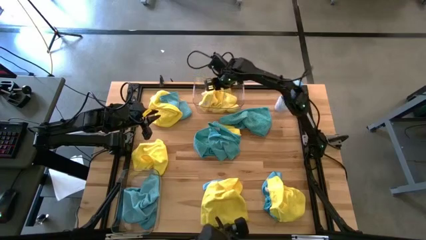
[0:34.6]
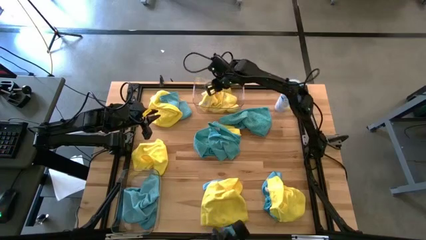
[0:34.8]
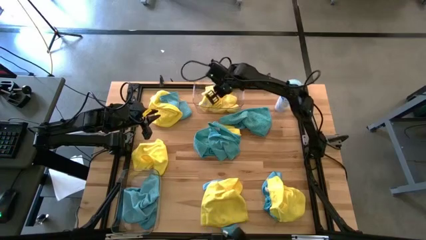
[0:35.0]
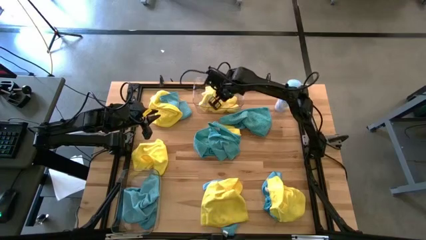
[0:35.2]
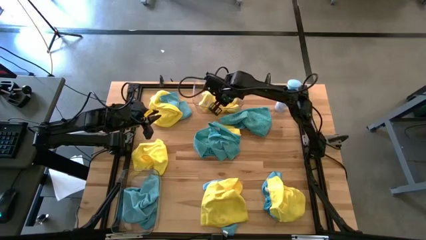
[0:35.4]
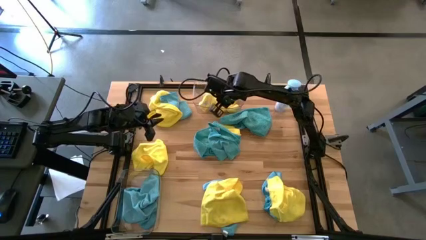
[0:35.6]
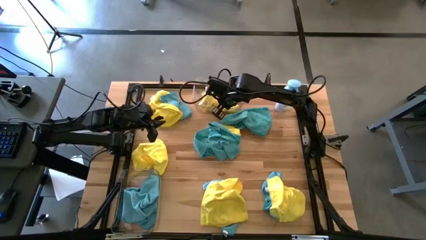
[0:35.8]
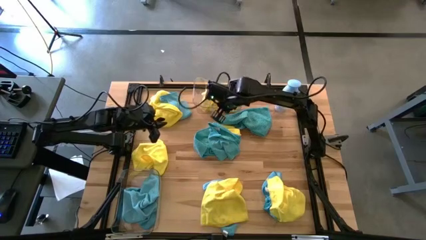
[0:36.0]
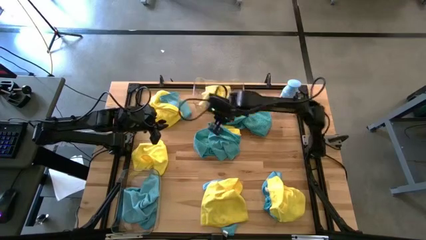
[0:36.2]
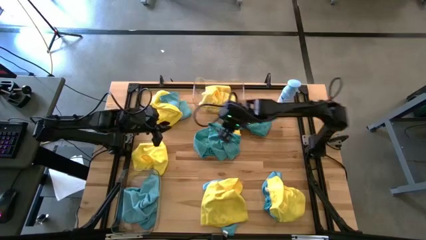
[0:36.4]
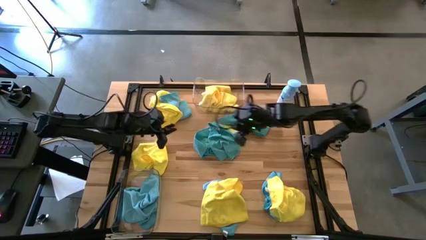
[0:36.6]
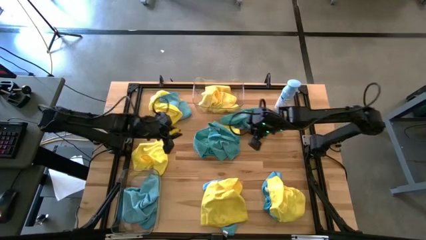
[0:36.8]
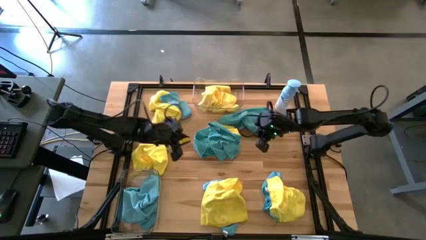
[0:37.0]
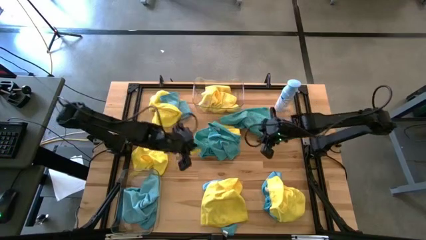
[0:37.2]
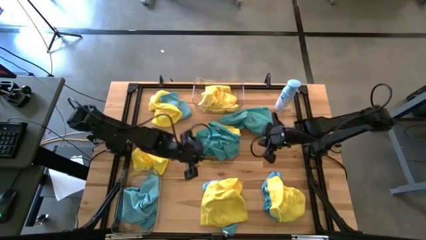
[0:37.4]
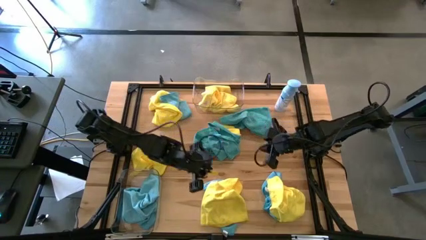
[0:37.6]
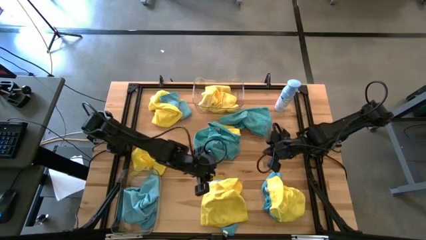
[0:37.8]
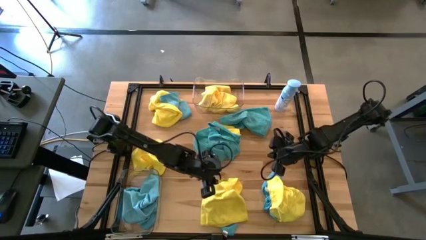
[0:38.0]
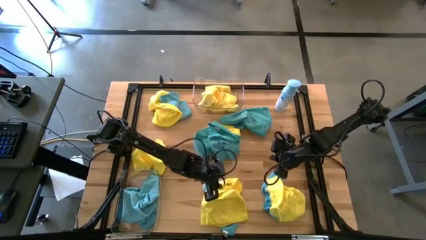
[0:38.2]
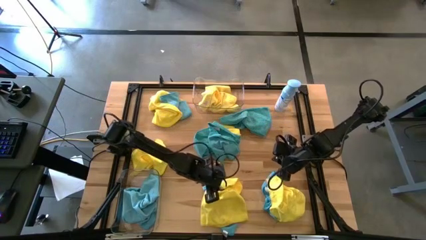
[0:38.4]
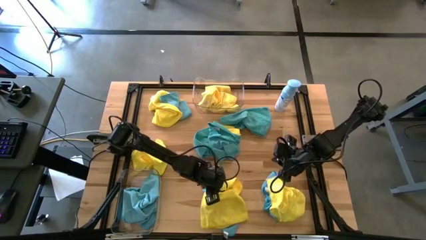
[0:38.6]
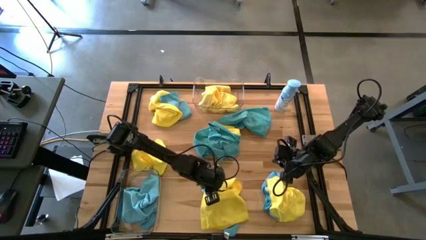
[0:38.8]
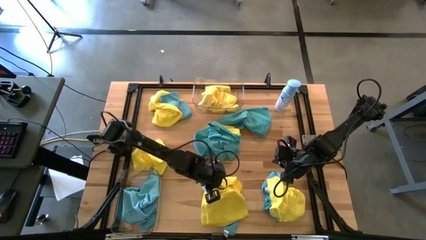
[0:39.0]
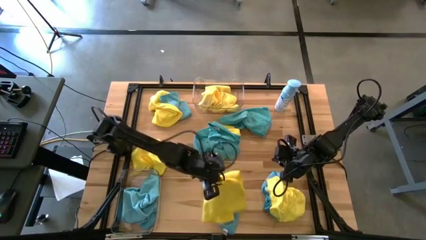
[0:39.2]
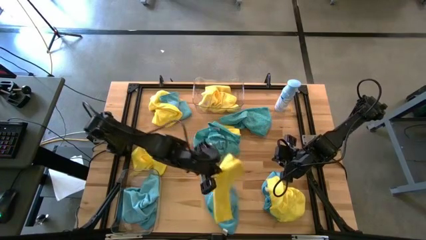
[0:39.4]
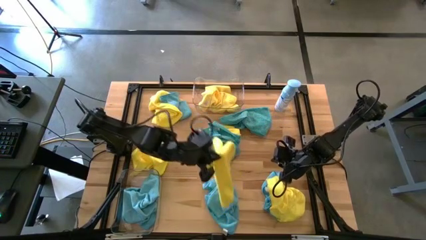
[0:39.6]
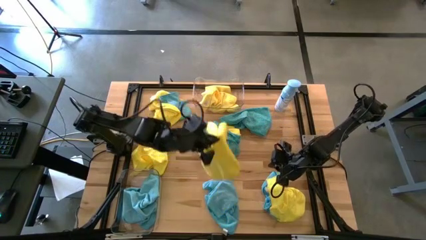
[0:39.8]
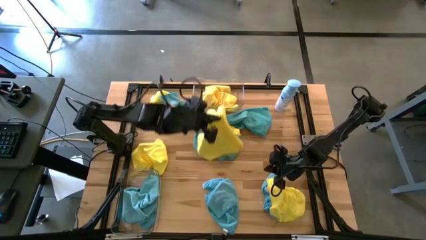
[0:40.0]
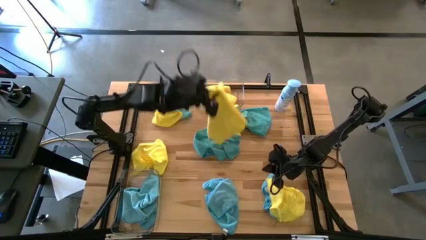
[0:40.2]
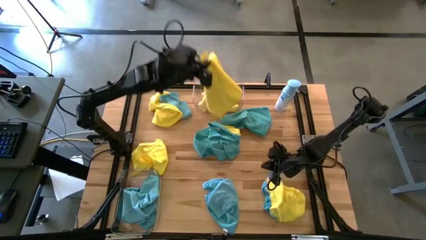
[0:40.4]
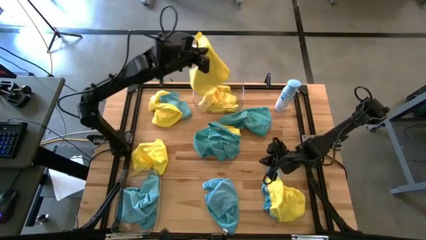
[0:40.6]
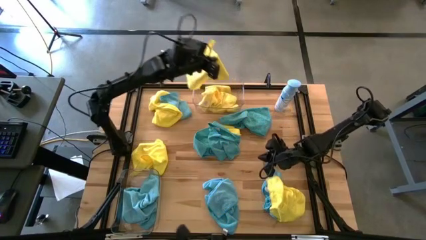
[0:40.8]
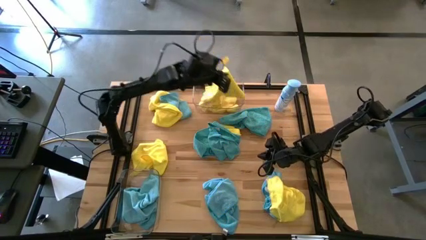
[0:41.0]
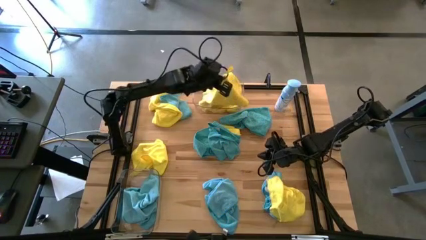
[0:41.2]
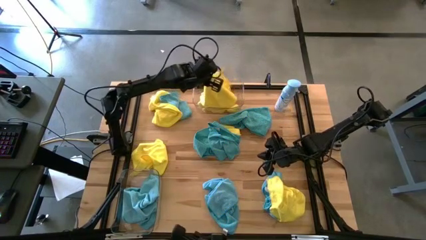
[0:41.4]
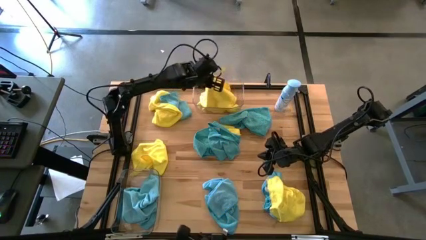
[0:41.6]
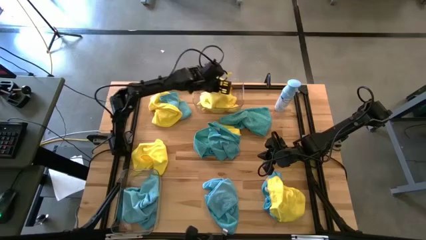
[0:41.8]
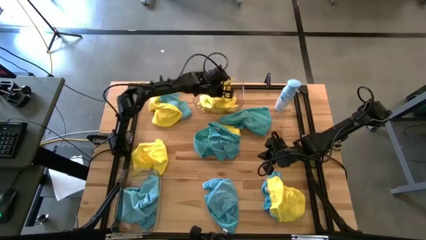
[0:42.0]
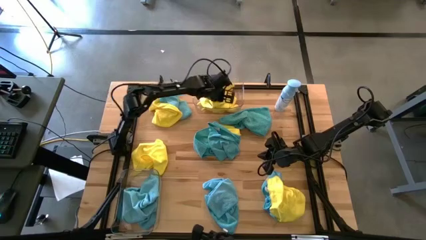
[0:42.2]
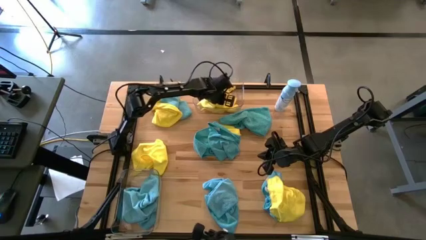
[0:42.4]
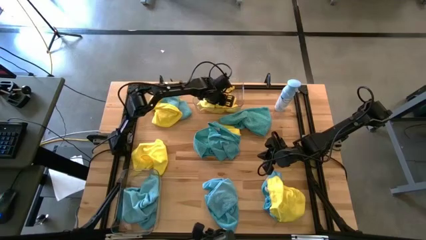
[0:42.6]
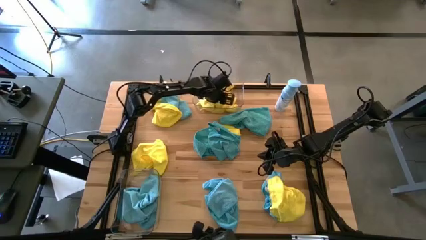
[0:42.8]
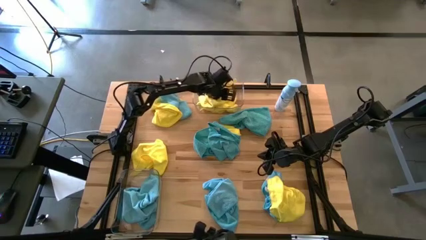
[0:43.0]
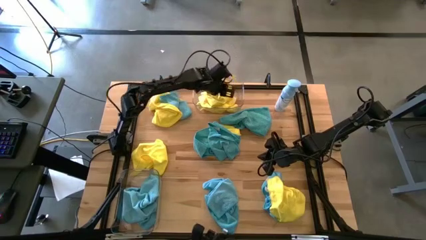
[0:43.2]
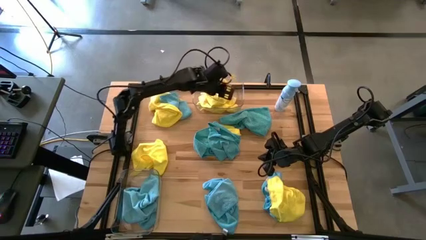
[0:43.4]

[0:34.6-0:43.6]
Task: Sort microfiber towel by color & place in baskets
Put the yellow microfiber towel into the top transparent bin

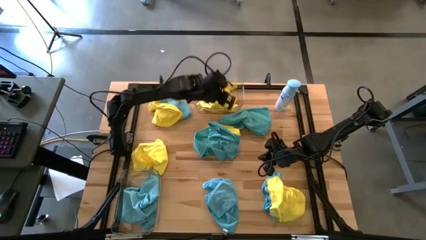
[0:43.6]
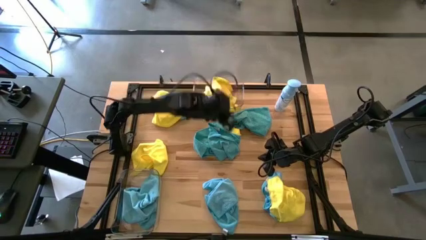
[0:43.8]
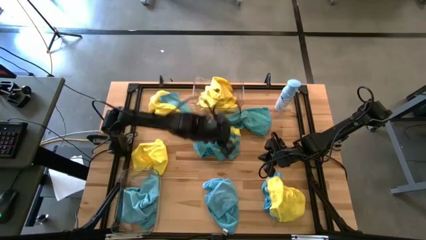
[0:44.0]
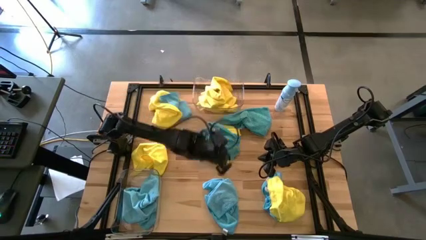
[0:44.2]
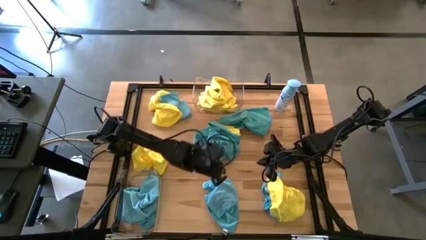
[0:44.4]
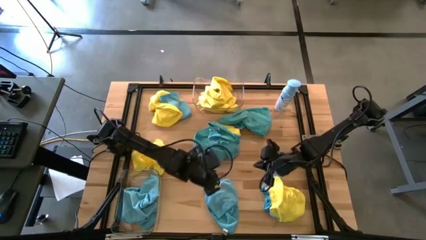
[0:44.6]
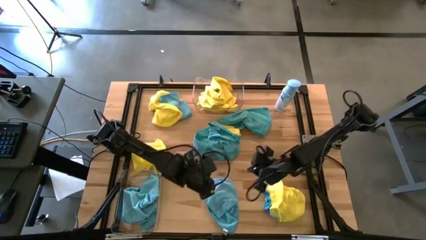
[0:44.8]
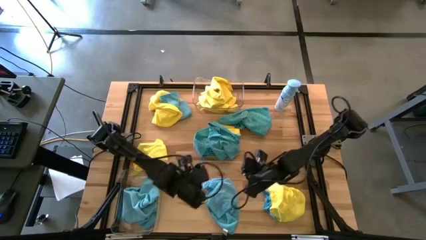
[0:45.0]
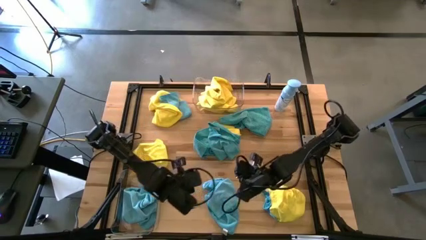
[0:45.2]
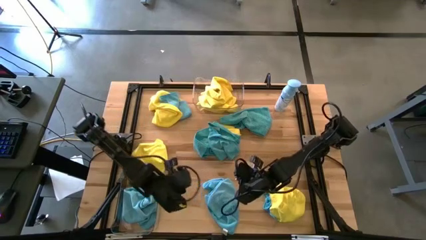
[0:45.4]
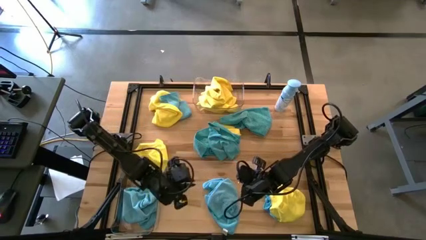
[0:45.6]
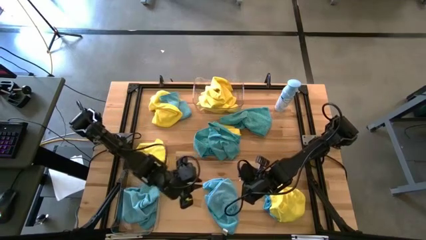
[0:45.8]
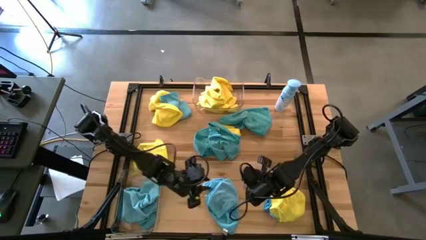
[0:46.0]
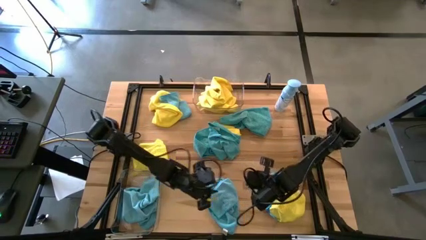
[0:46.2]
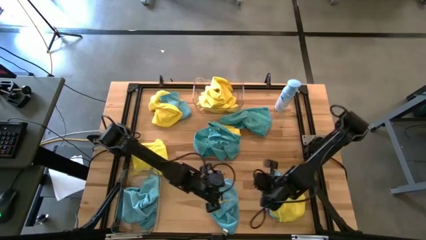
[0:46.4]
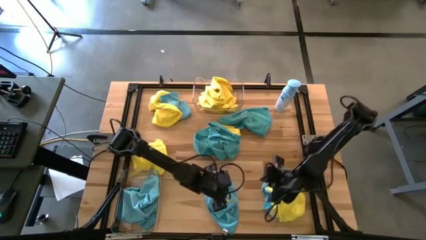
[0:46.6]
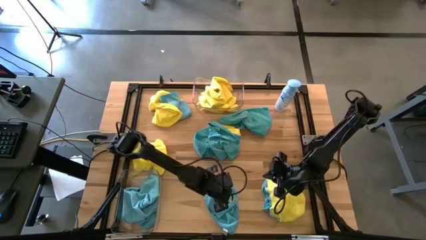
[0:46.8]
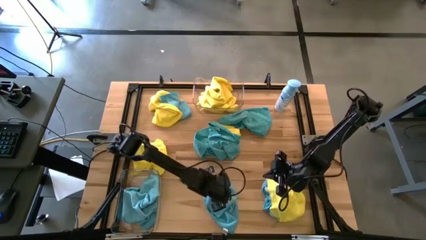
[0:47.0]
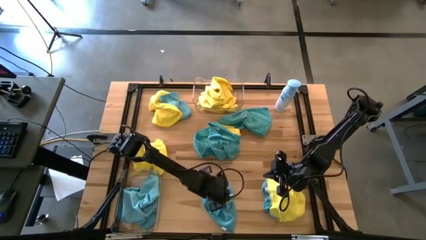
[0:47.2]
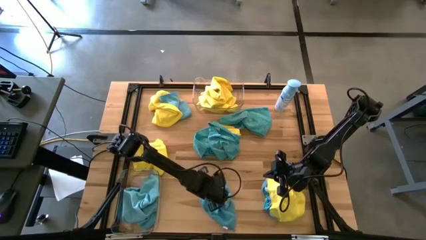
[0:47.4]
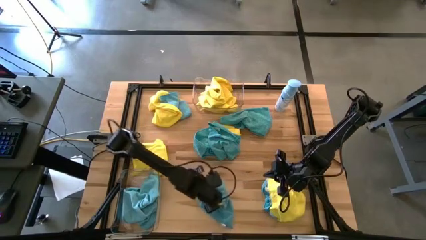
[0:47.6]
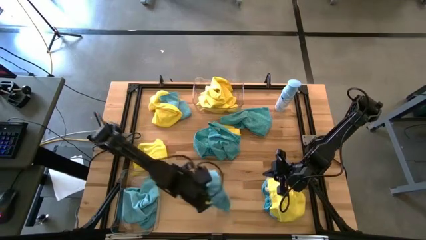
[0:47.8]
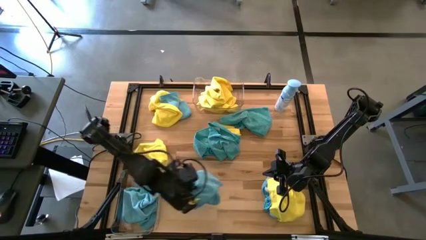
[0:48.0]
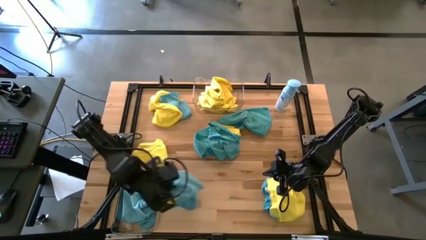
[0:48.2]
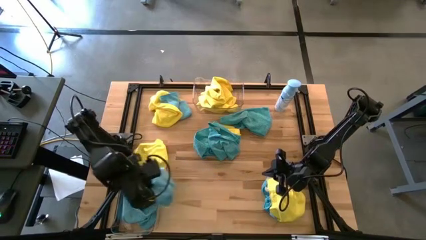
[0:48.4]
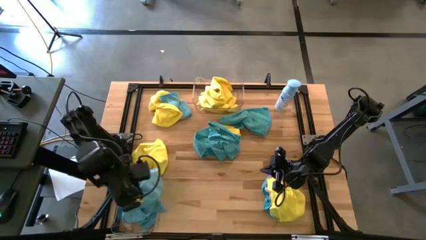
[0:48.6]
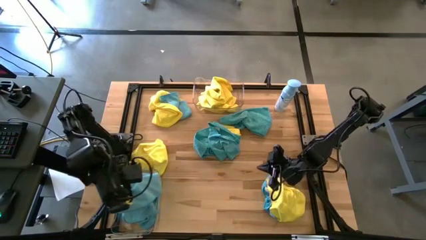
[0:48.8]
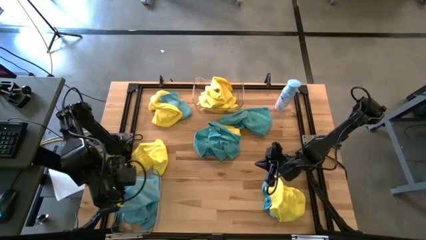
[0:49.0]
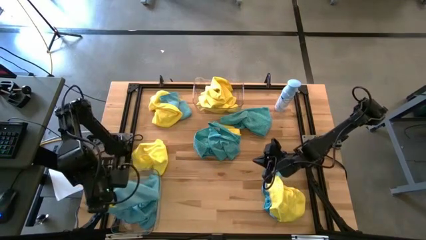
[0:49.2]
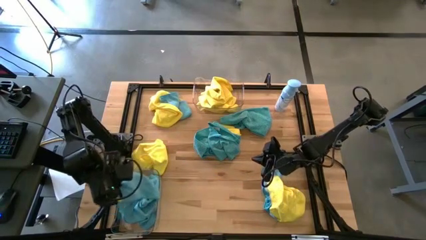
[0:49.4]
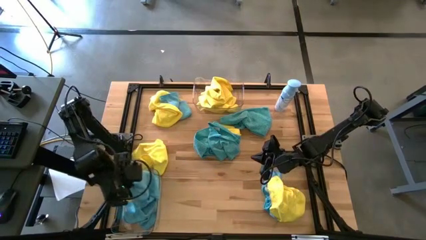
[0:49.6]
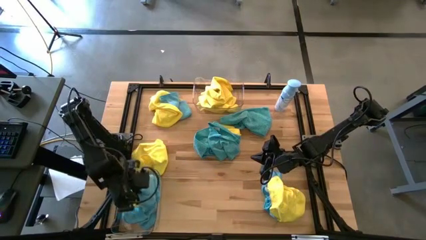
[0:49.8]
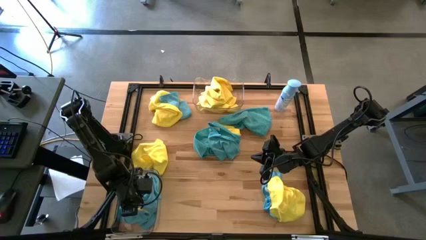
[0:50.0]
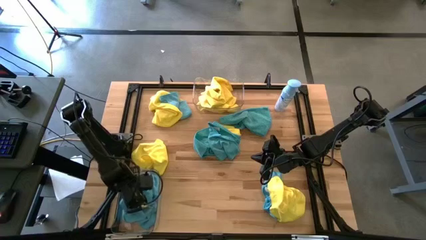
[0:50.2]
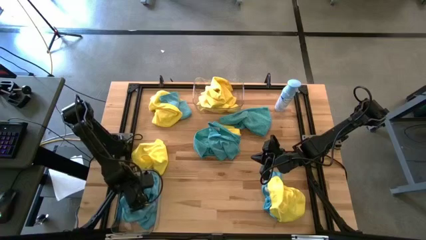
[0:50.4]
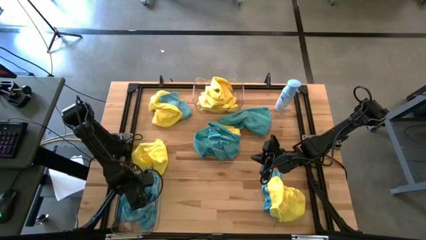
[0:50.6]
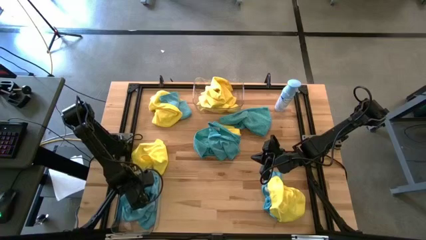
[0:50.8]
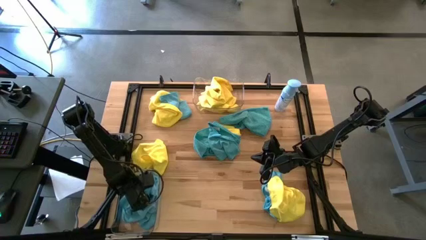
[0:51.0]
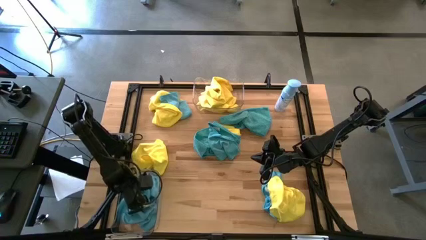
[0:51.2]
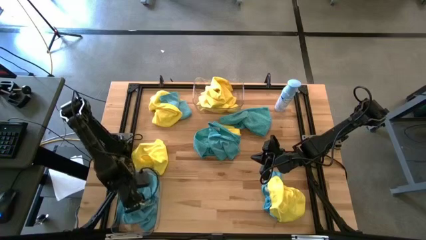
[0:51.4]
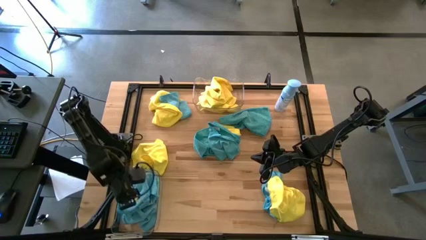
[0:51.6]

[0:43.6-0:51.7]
Put the blue microfiber towel into the bottom transparent bin
